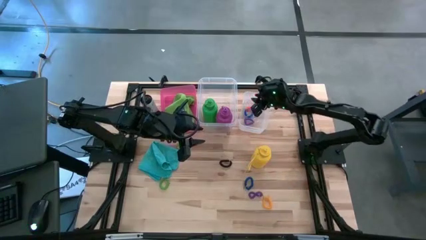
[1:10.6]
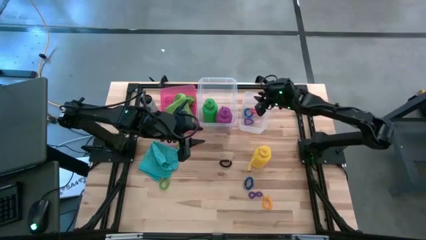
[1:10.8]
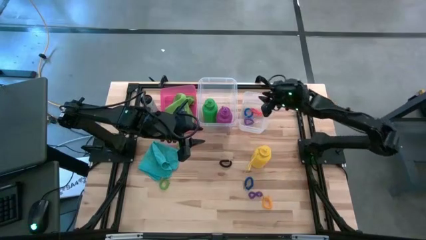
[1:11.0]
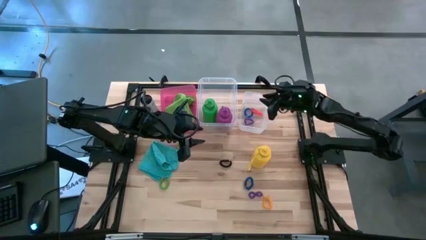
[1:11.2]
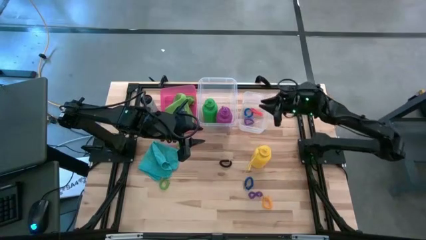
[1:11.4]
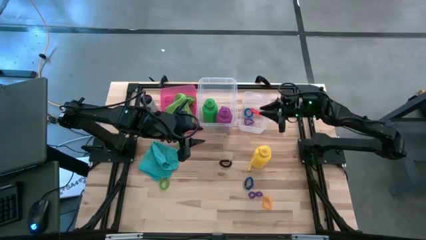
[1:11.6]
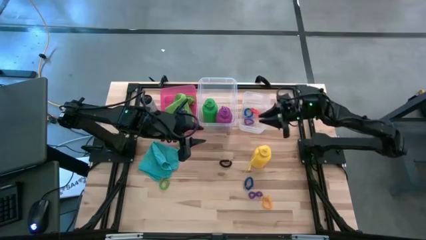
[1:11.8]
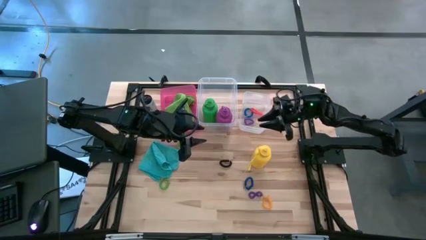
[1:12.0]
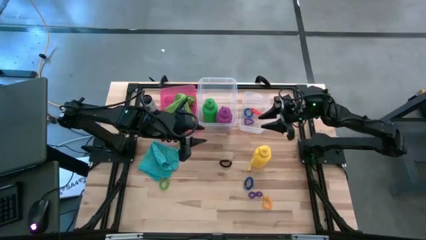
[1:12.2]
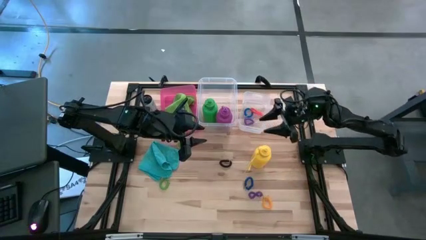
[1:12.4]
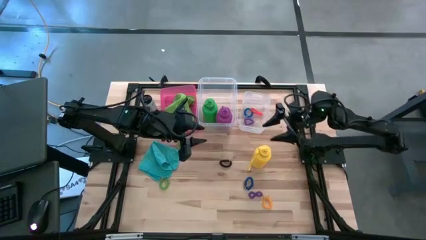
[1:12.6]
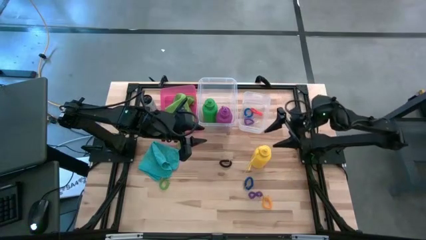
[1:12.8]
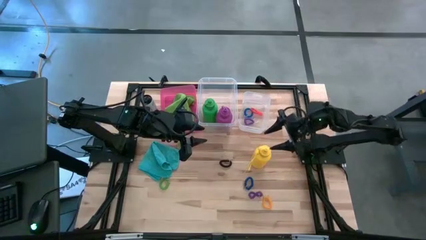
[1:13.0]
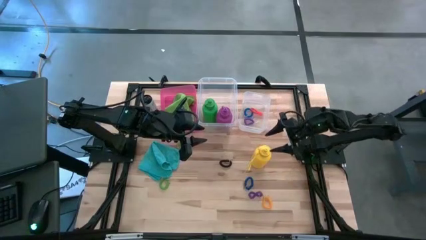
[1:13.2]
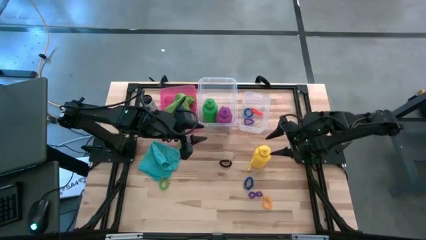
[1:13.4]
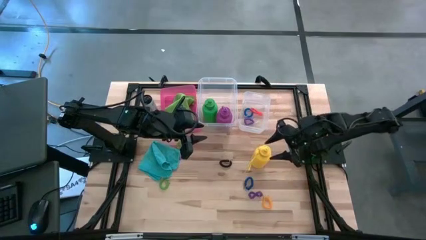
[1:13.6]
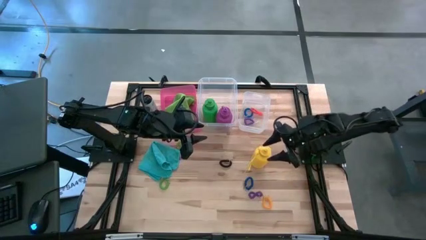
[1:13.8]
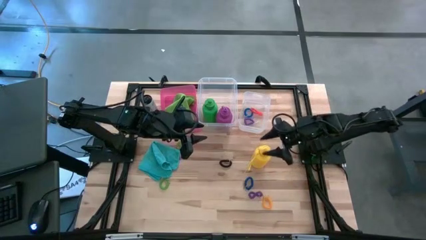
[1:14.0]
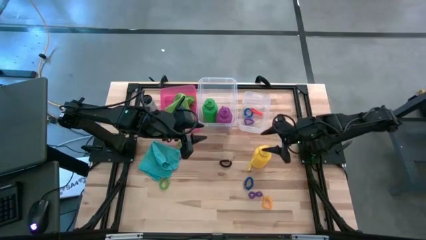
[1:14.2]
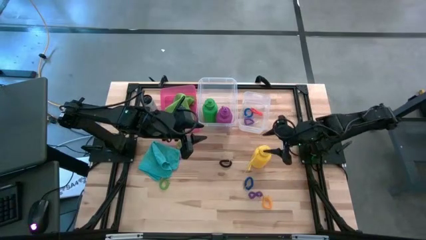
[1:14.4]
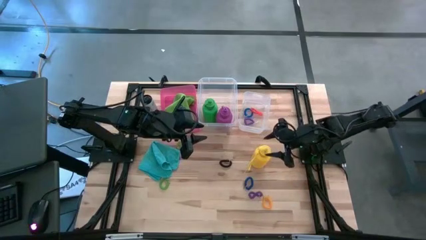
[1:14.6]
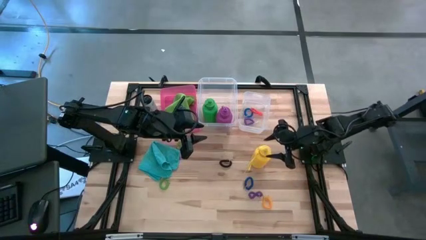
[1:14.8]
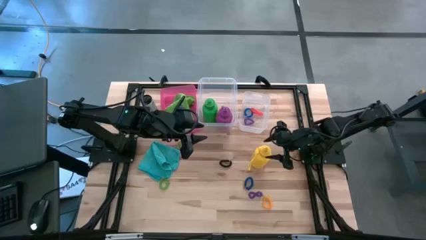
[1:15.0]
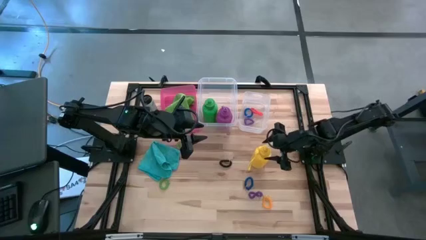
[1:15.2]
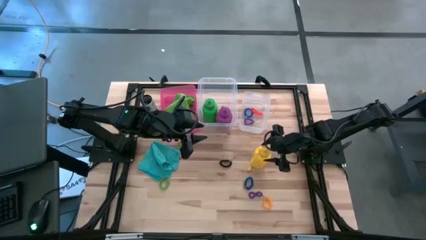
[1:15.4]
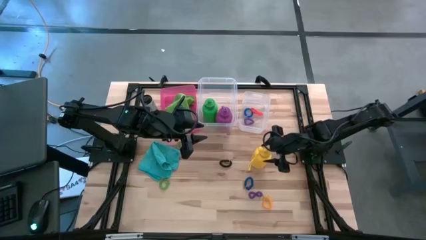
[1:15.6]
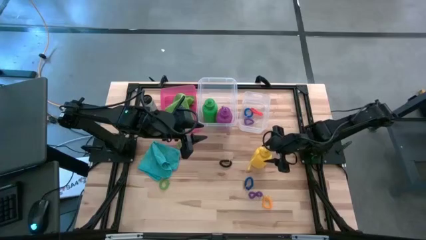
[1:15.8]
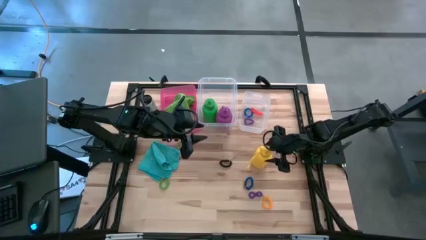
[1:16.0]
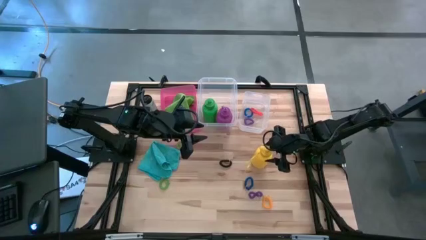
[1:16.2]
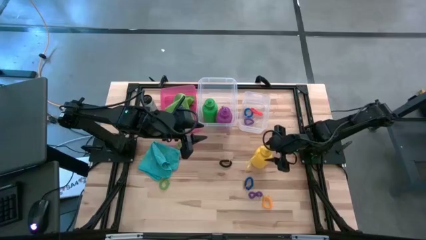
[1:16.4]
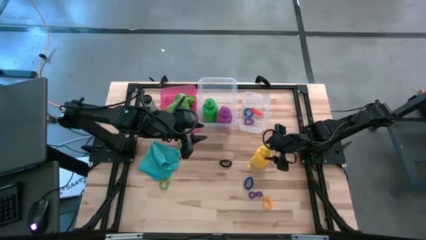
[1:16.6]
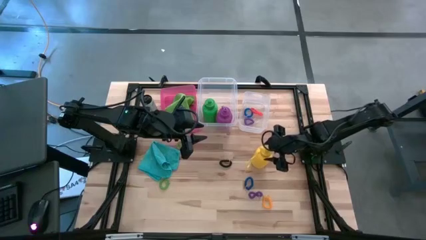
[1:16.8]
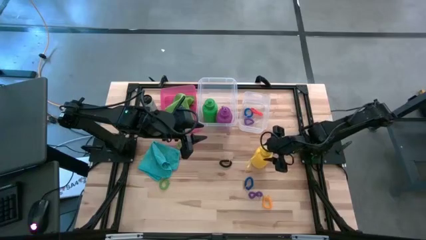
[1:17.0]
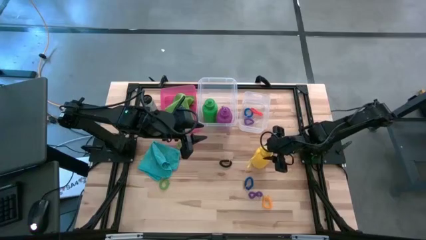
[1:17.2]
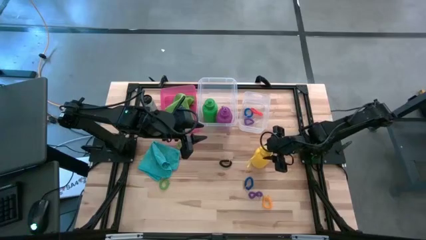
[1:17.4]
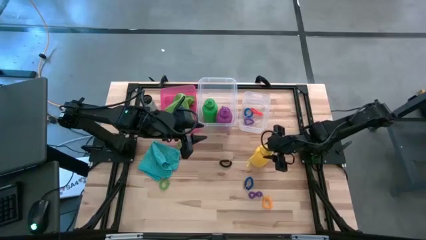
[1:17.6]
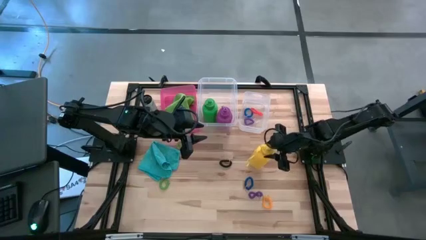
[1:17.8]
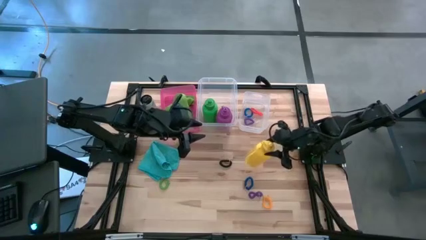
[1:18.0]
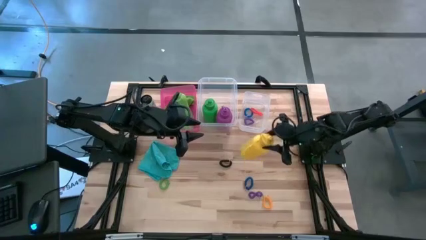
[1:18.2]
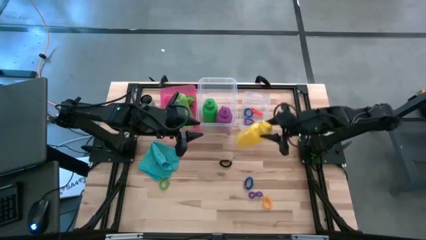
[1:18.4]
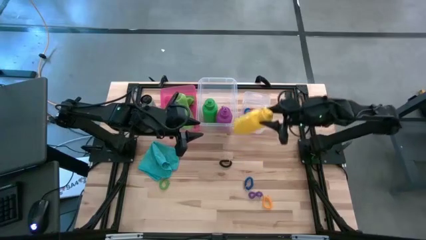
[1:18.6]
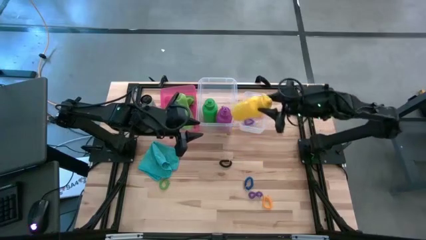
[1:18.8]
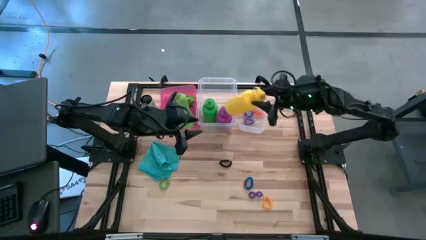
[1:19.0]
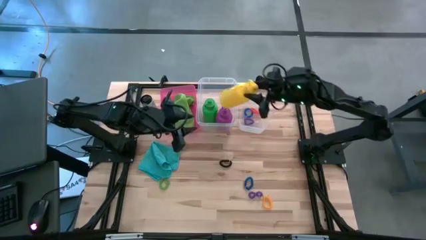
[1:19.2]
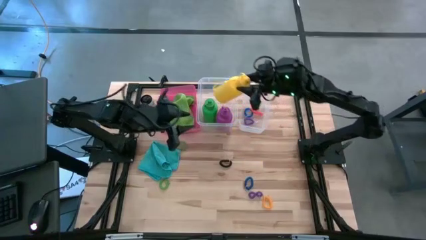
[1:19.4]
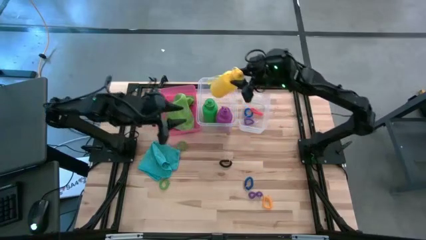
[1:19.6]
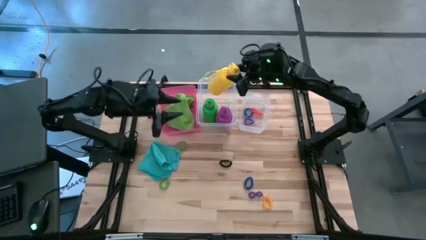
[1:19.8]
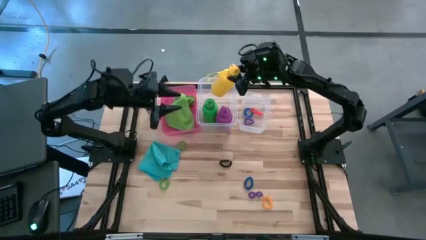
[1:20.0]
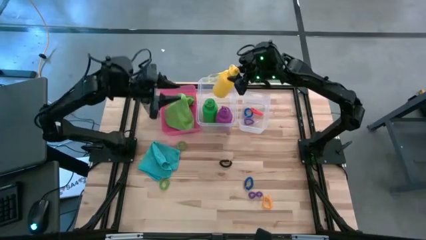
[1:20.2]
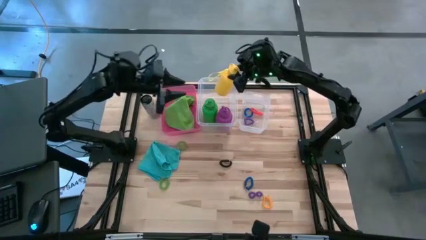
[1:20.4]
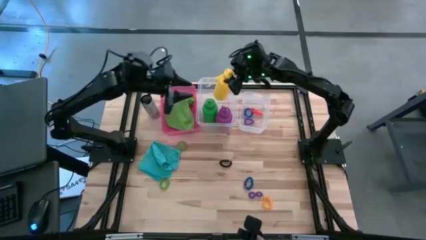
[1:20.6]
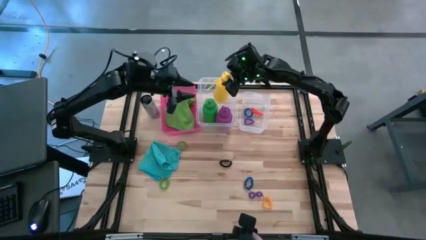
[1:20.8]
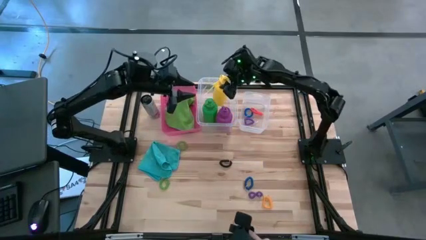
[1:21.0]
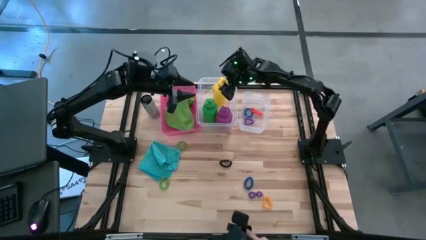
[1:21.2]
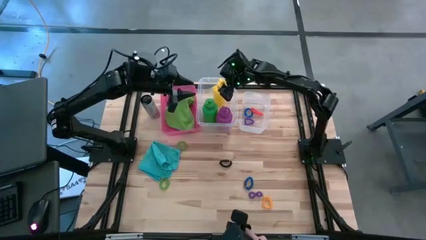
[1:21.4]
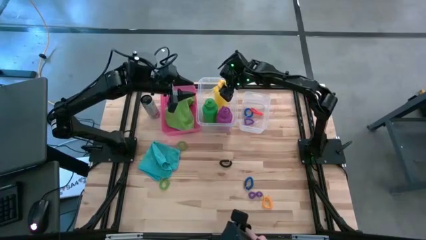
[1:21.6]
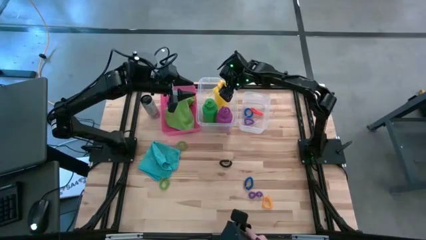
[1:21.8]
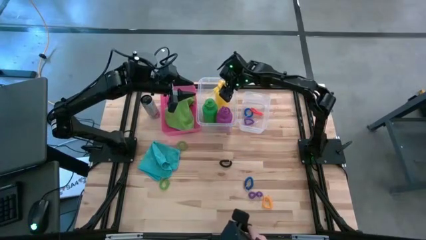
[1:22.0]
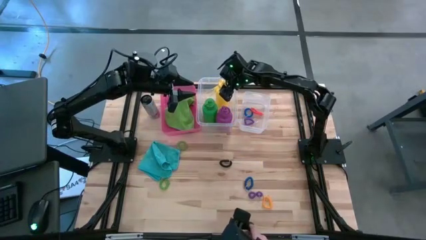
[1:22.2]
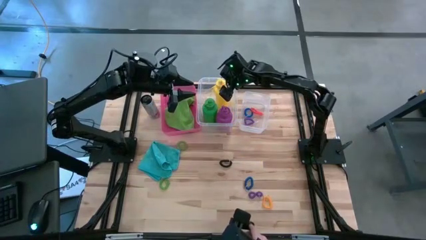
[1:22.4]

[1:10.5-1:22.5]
Task: Pick & Place Sports Items
Put the yellow water bottle into the left transparent bin

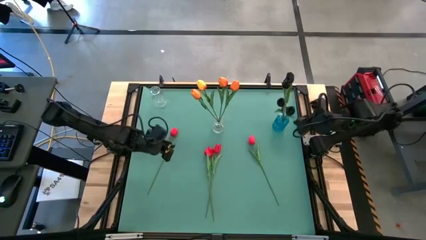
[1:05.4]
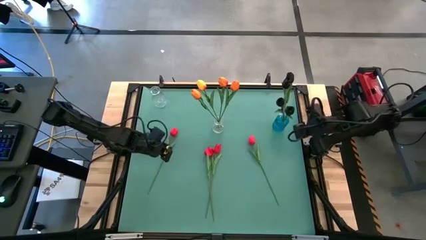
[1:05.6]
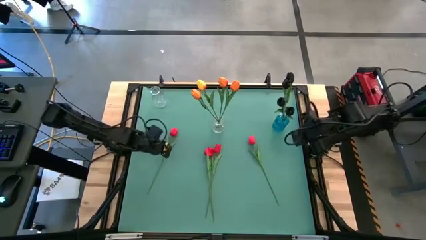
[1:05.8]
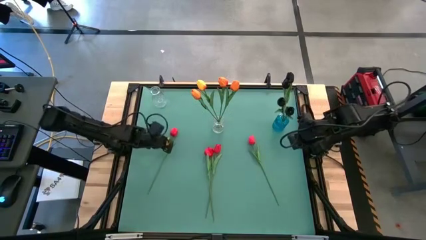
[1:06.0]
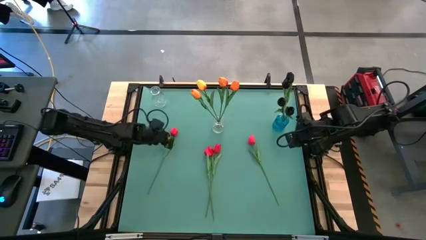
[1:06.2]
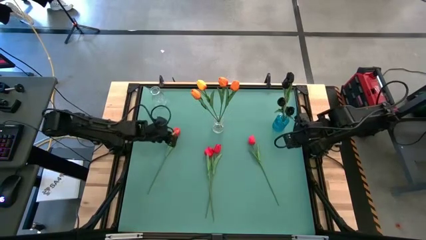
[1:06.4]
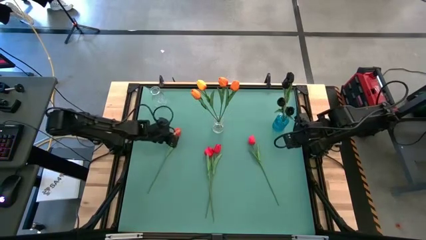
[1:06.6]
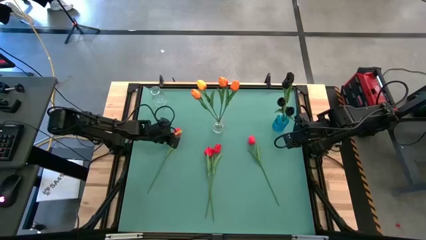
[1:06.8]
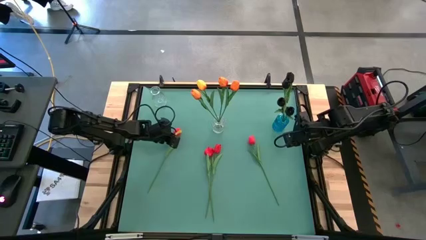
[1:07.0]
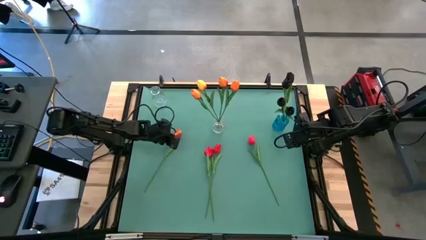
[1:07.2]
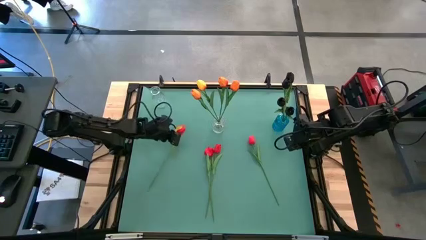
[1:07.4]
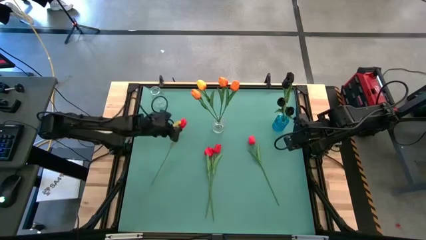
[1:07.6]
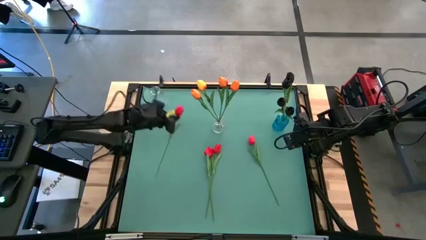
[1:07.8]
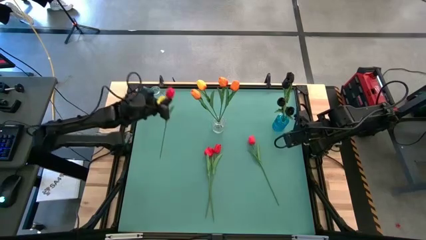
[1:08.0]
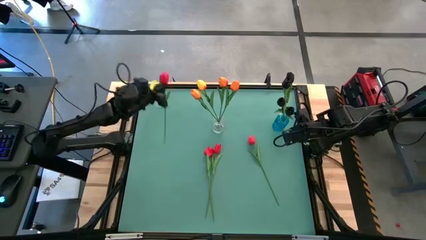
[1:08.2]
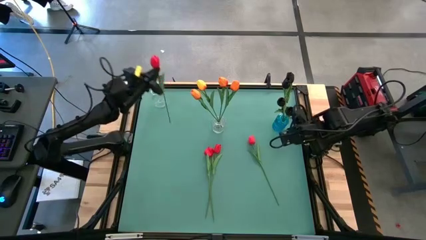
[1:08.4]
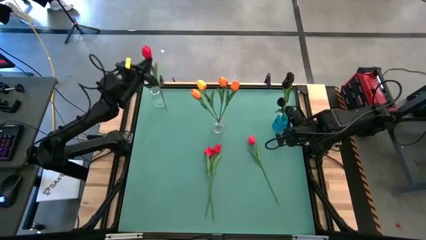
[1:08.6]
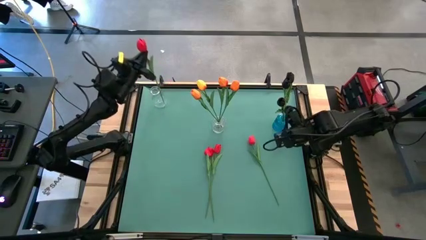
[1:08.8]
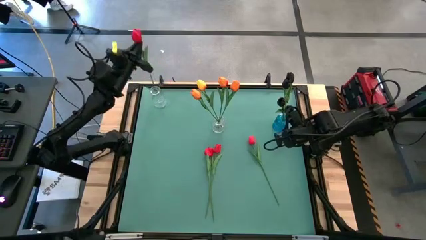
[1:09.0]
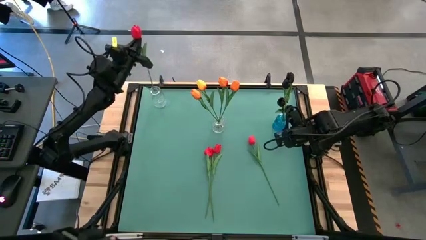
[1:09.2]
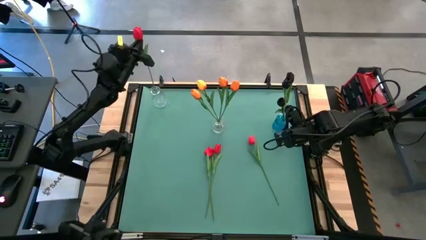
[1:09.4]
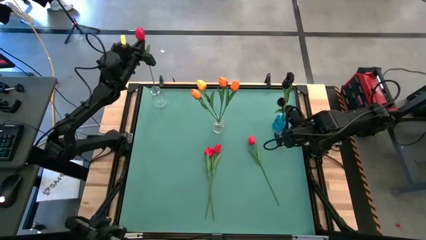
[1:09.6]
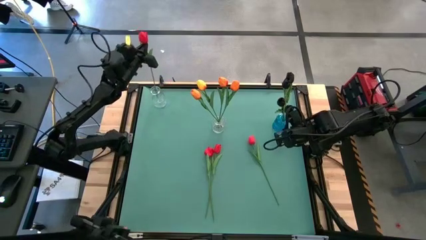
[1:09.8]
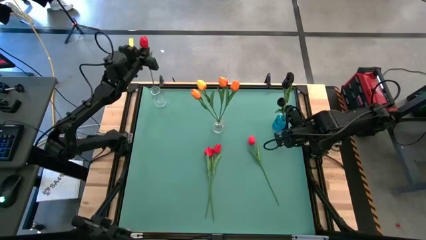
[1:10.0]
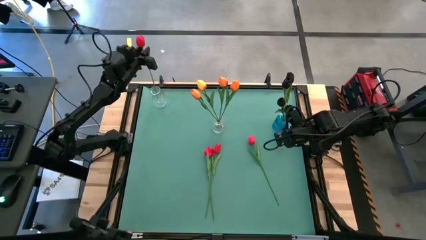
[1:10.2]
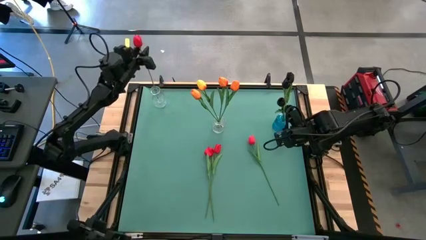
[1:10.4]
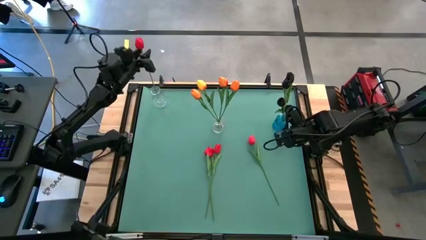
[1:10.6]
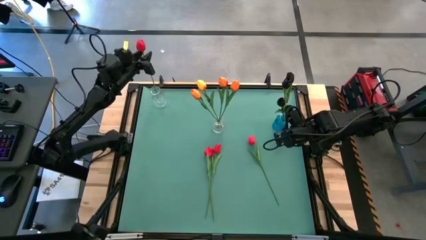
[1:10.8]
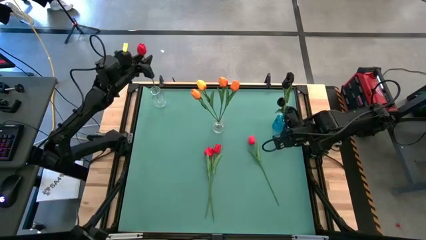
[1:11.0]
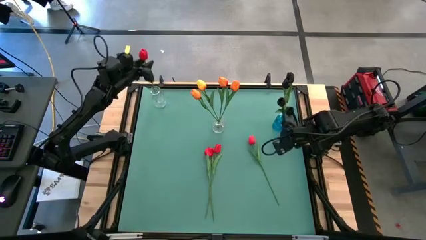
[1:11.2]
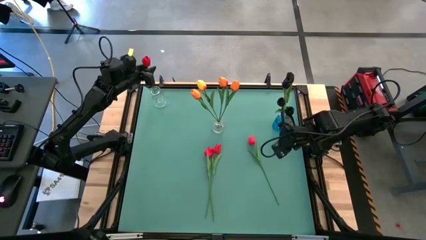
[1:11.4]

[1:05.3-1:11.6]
Task: Sort flowers into vase by color
Put the pink tulip into the top transparent vase
